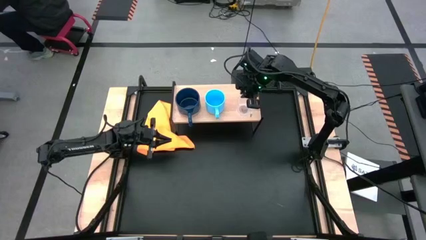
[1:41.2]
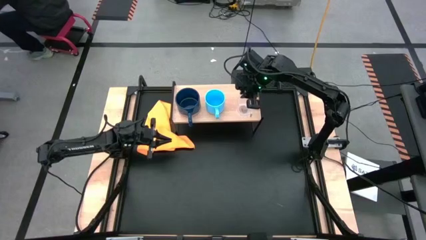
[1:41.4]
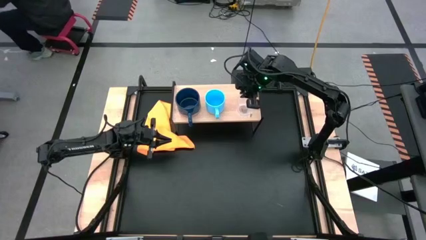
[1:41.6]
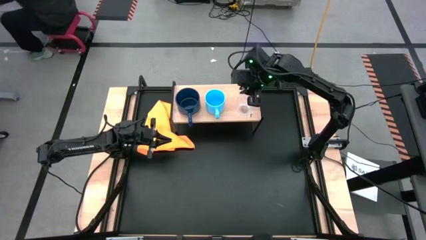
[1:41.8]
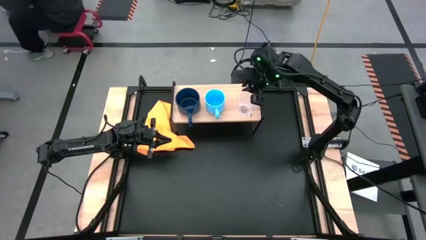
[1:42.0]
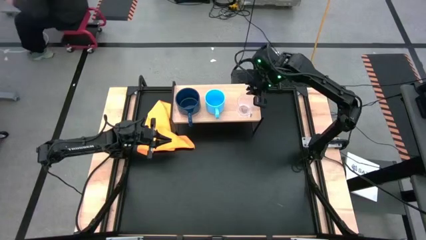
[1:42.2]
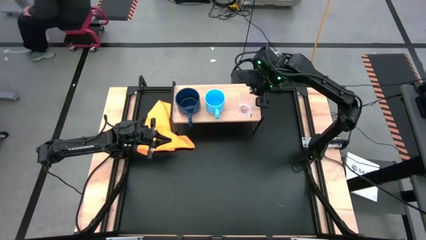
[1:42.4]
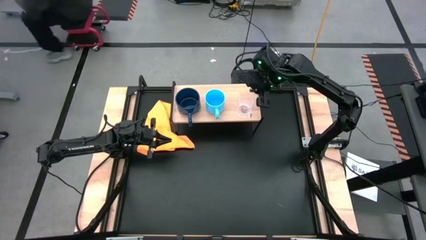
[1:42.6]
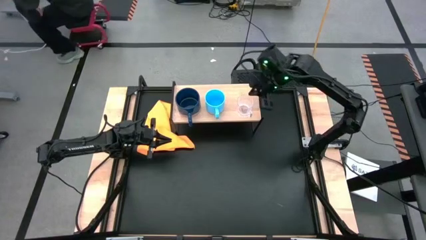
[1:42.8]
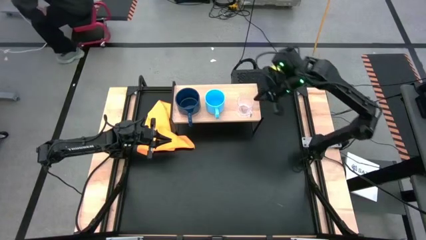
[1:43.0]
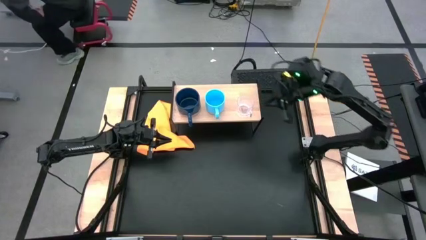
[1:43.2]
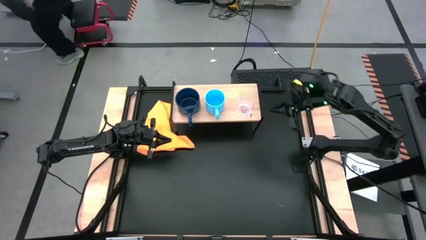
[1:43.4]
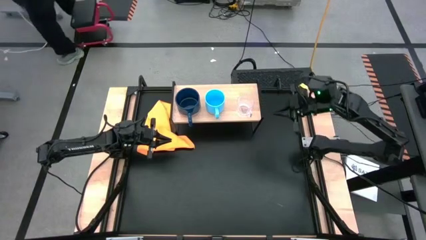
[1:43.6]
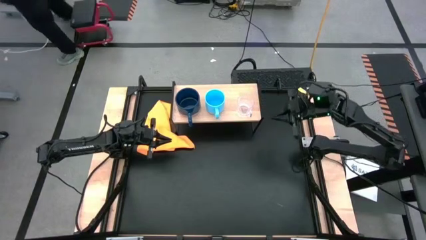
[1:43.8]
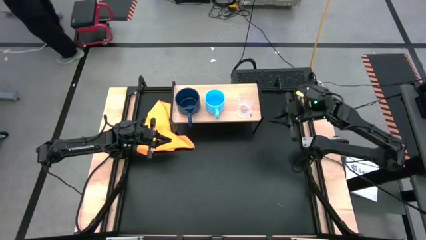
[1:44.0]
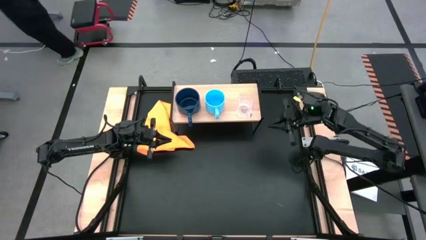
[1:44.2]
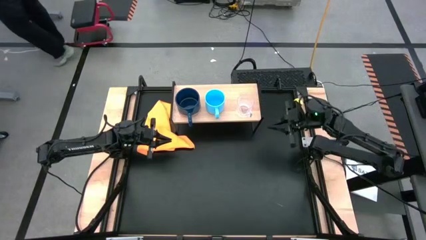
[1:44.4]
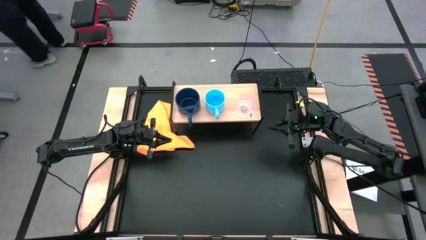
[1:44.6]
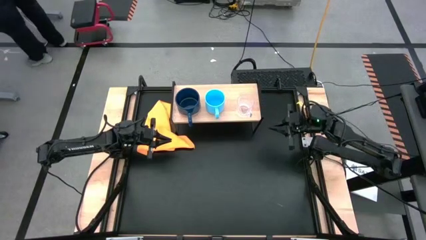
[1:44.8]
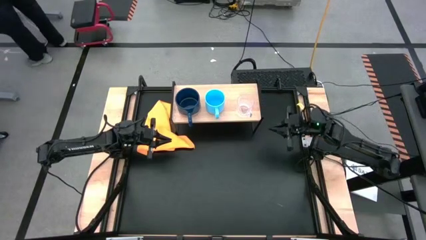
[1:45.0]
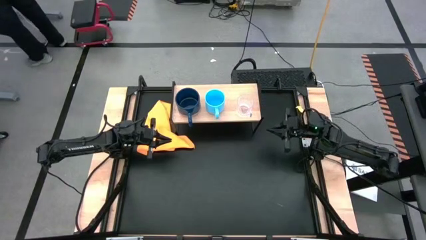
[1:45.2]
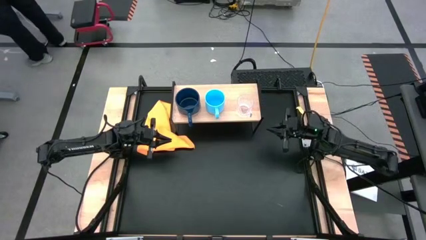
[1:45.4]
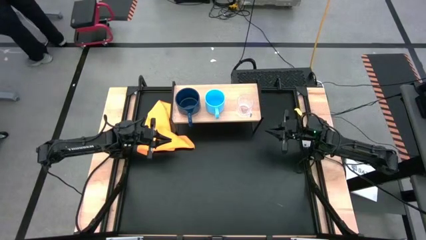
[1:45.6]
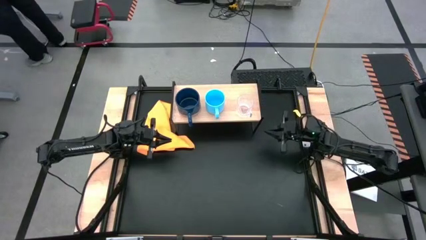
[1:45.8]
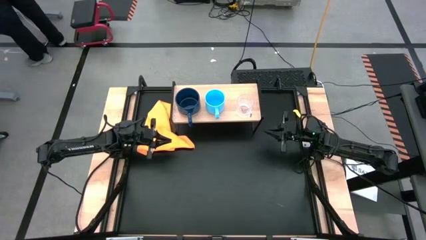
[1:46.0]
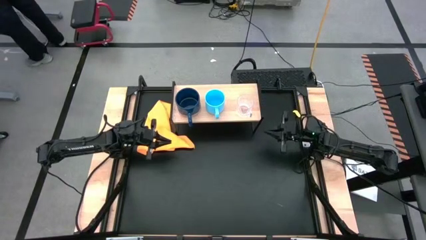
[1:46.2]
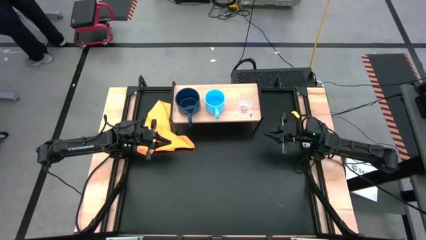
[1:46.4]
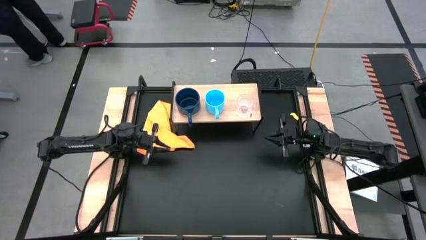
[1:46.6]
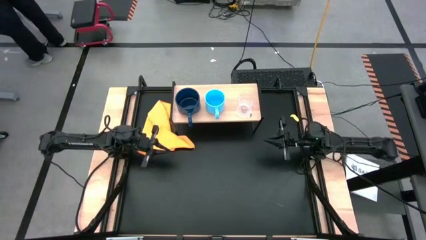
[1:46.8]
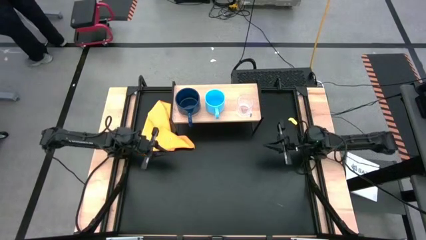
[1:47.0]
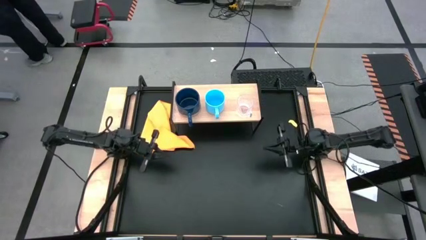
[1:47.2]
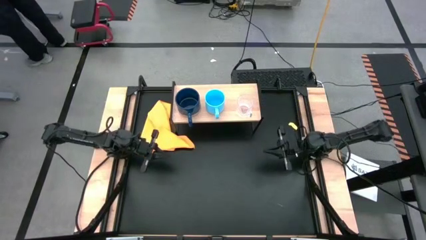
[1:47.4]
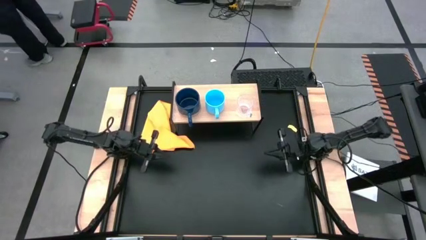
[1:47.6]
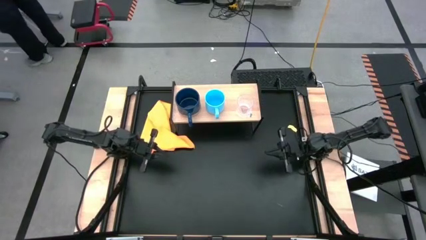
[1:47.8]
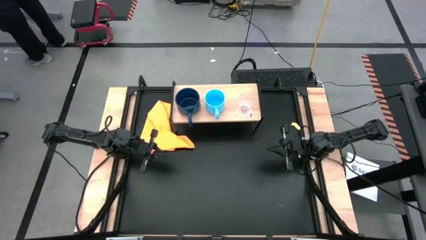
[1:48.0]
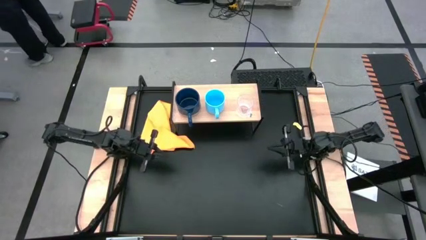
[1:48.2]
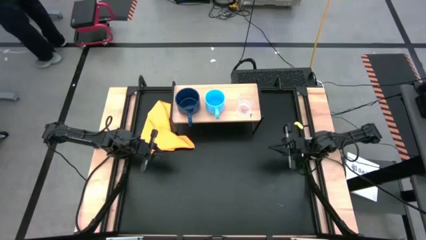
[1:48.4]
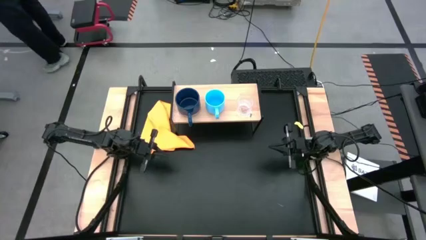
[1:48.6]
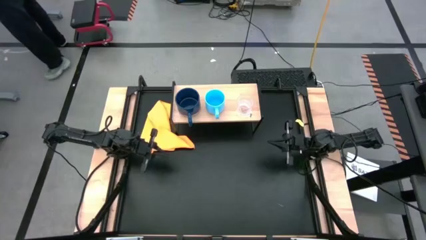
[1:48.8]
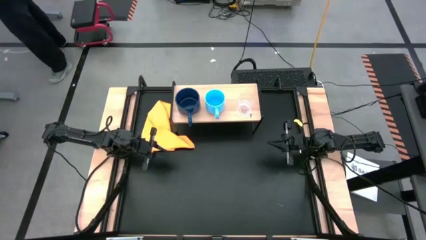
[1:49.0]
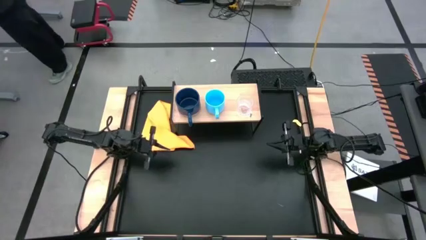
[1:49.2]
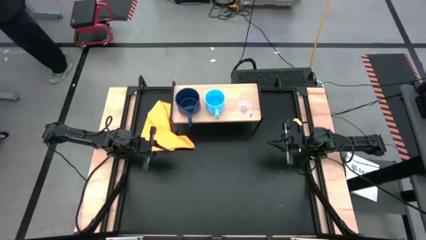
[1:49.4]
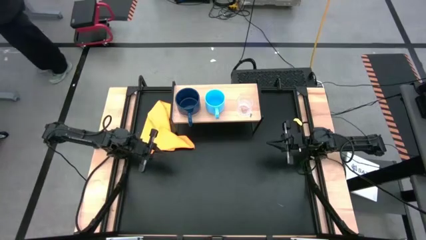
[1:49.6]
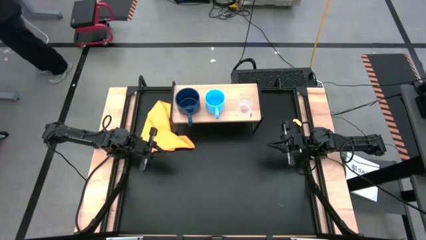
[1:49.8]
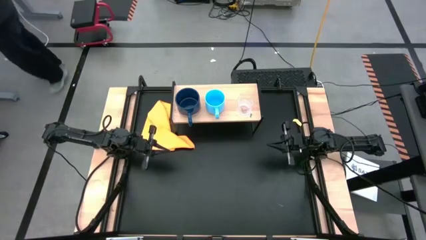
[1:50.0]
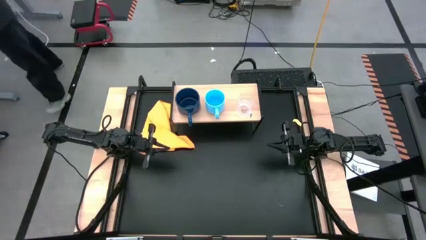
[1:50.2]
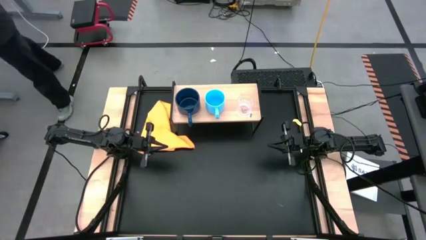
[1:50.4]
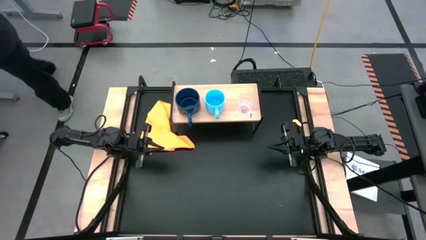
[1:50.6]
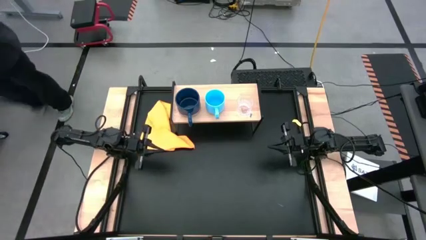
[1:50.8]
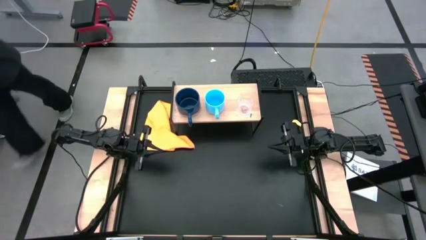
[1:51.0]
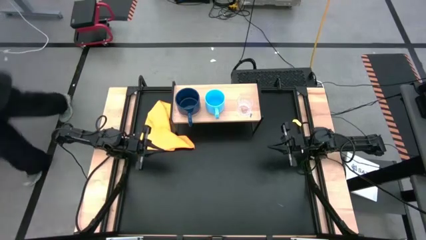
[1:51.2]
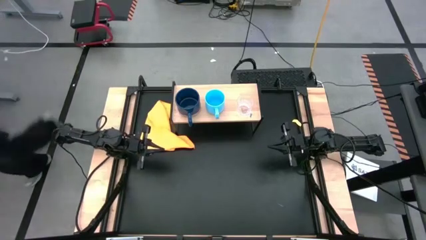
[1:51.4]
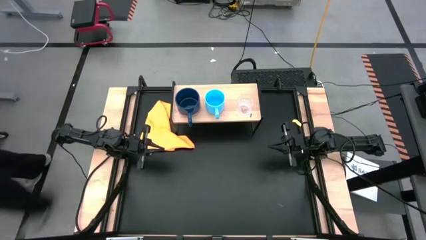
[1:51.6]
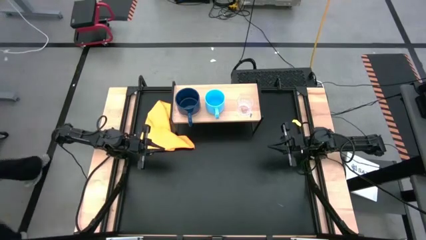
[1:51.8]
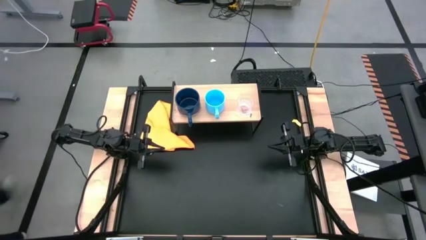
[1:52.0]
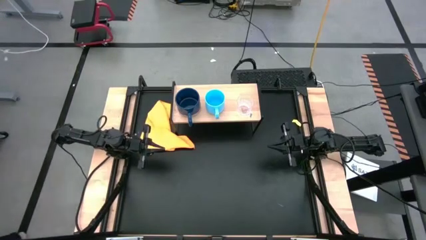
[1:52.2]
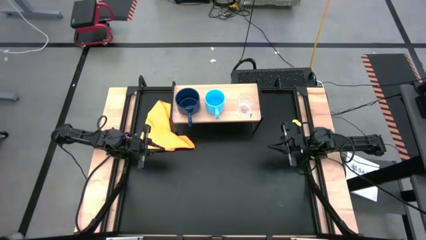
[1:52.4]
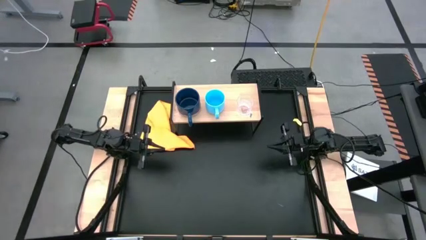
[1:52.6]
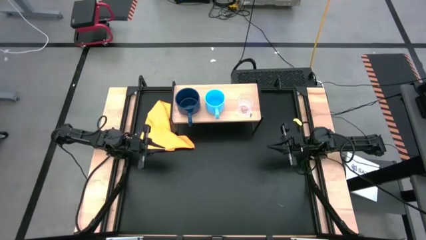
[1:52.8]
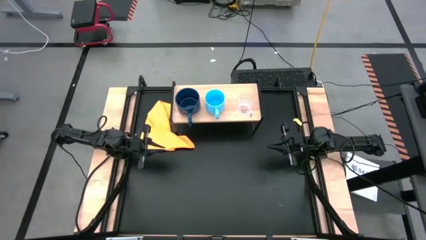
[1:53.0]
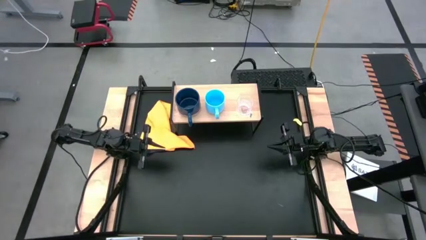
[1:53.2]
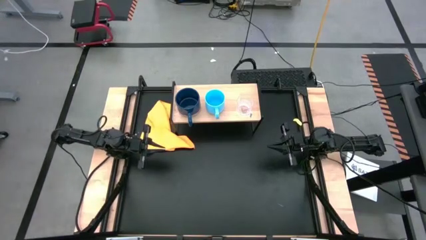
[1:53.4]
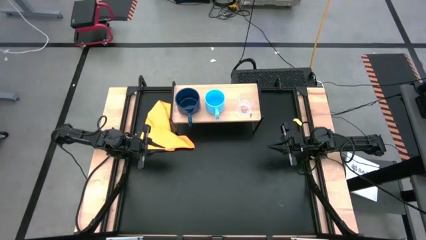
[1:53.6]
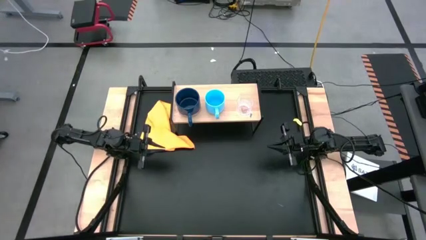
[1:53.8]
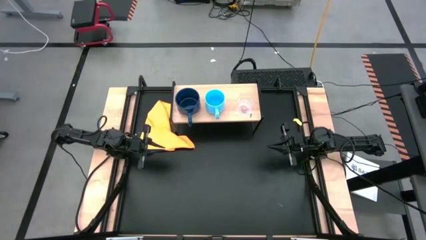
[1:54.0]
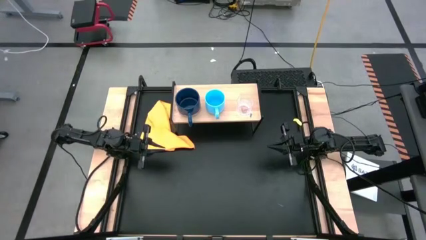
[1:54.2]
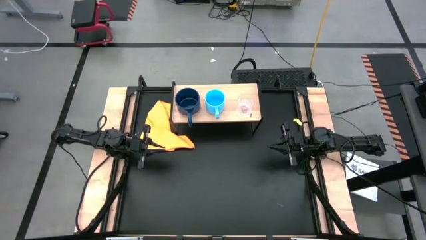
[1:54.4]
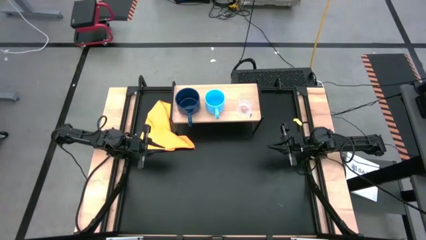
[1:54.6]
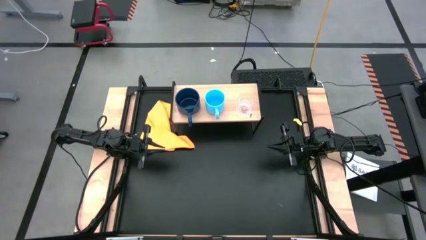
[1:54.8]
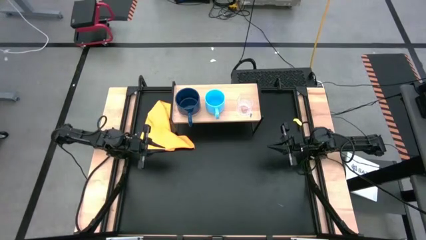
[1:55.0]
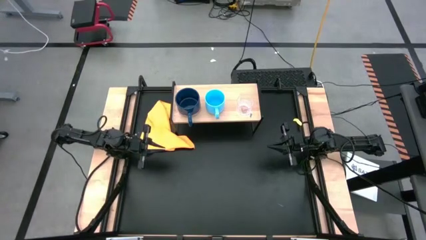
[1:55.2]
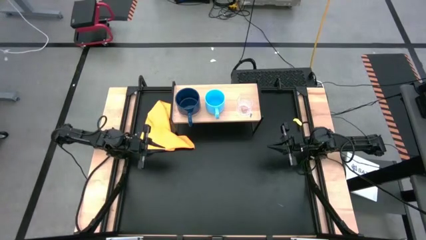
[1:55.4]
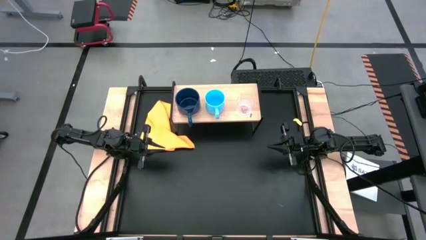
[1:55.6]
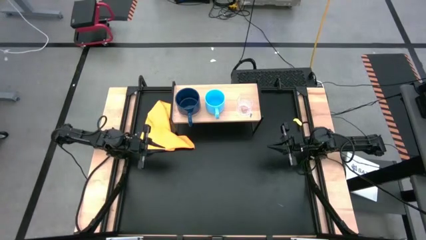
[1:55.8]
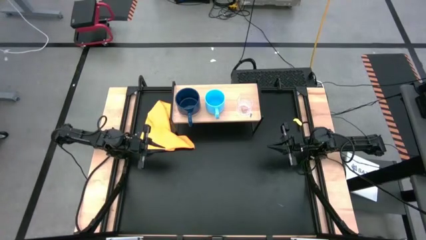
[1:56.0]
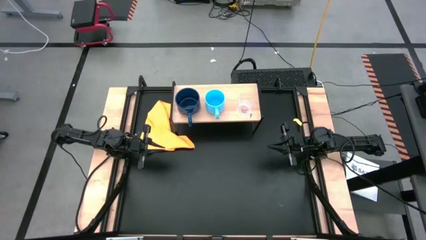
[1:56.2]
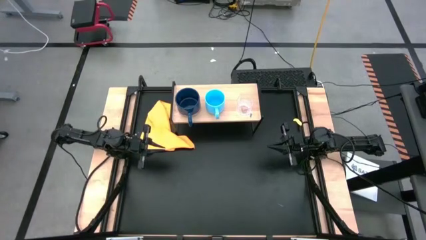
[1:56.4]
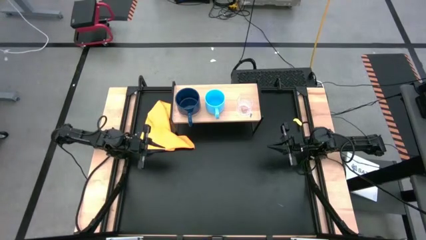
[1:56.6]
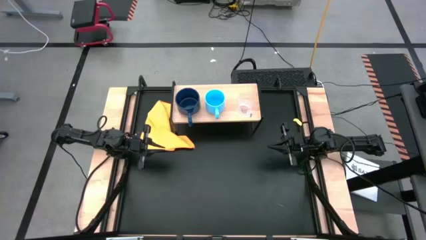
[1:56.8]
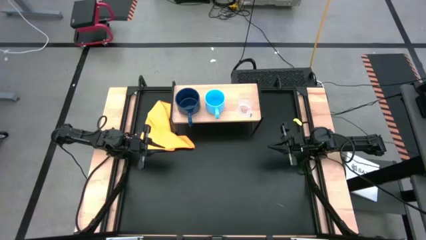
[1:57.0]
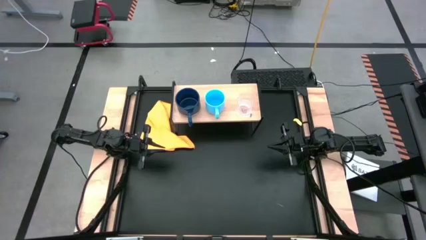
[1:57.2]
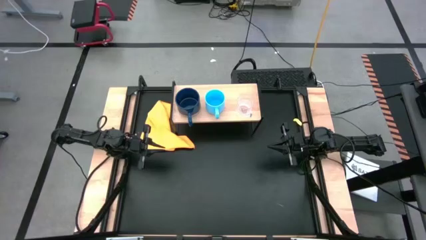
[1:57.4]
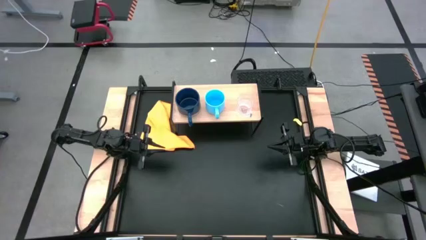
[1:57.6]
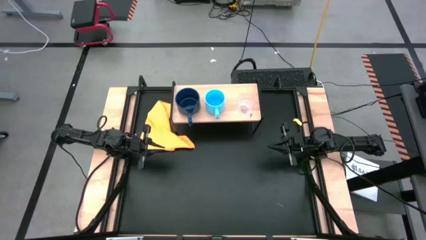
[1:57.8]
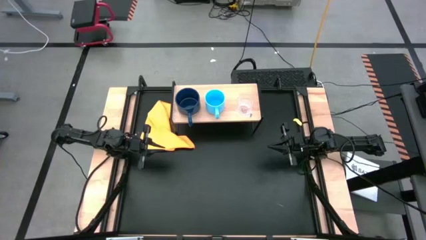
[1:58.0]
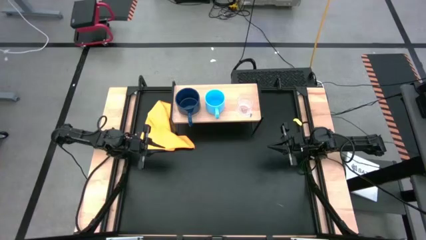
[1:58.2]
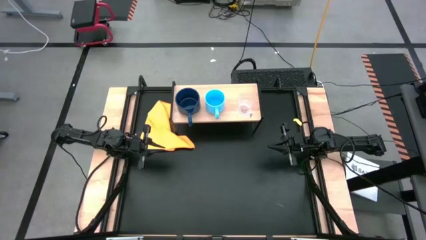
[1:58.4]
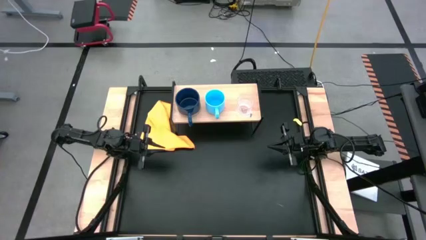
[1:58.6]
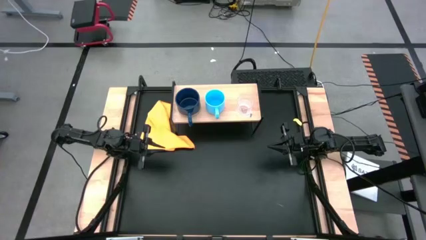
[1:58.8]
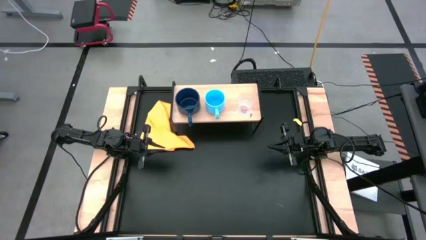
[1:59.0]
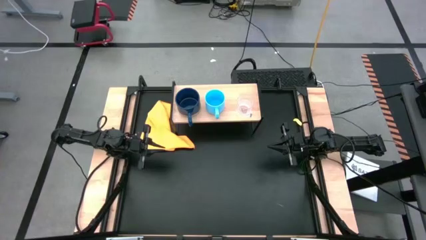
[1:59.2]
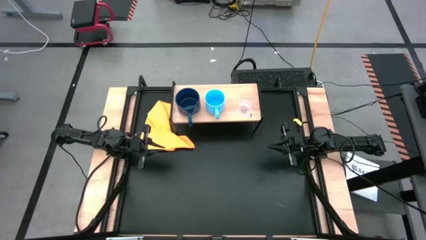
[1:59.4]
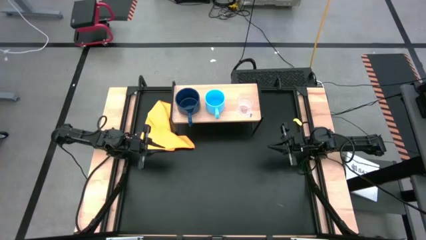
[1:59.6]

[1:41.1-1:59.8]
Task: Stack small to large cups/mugs on shelf
Return to Home Position
